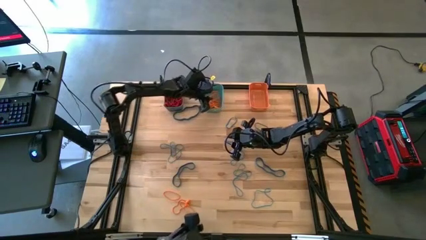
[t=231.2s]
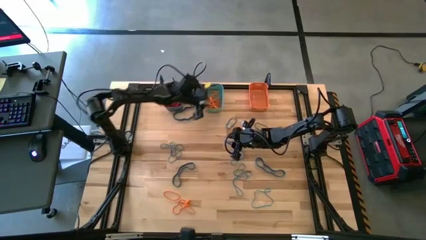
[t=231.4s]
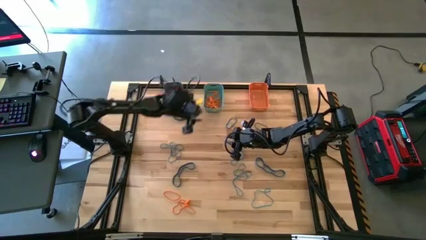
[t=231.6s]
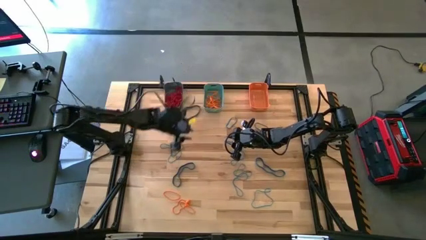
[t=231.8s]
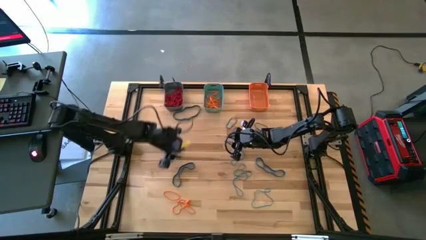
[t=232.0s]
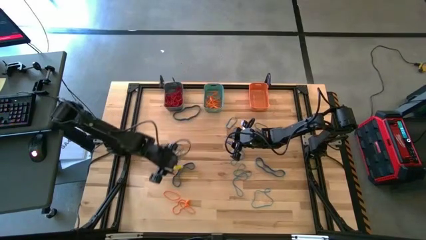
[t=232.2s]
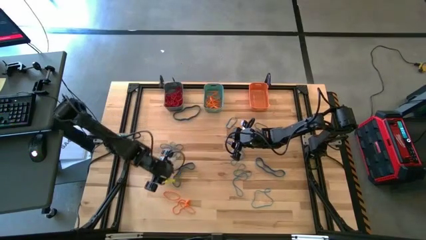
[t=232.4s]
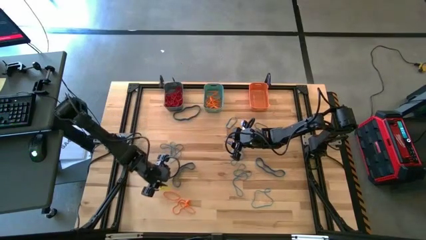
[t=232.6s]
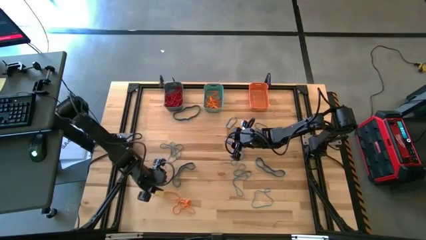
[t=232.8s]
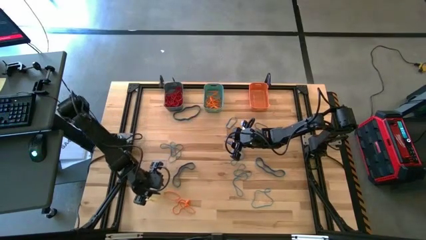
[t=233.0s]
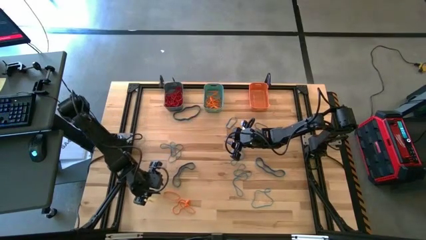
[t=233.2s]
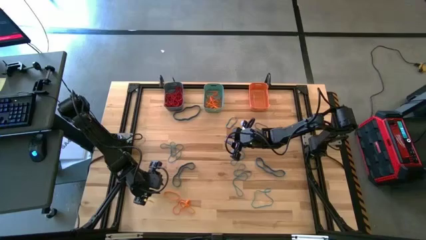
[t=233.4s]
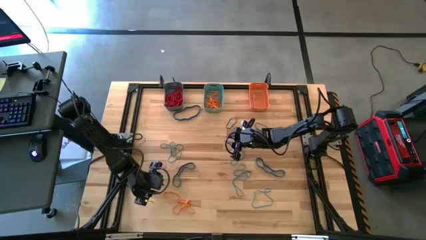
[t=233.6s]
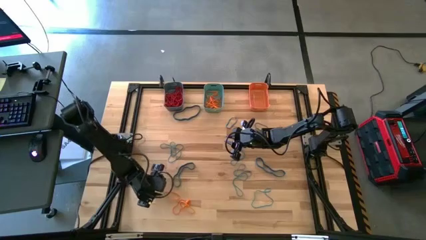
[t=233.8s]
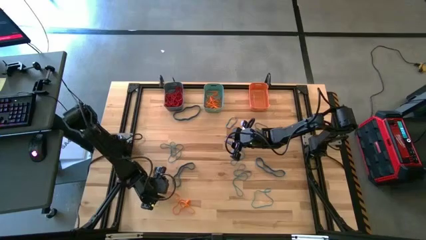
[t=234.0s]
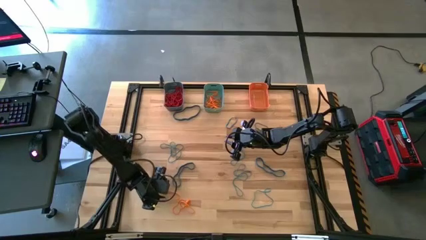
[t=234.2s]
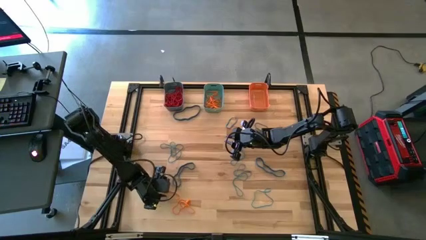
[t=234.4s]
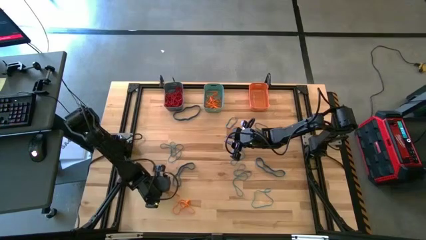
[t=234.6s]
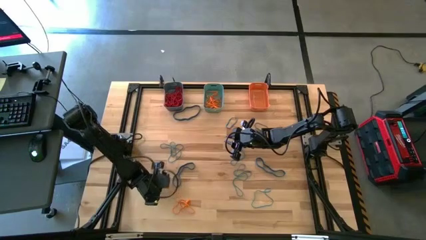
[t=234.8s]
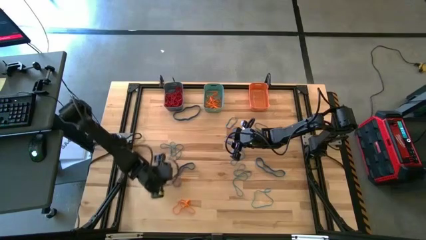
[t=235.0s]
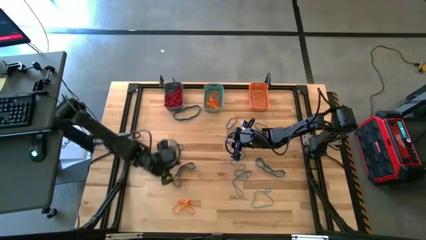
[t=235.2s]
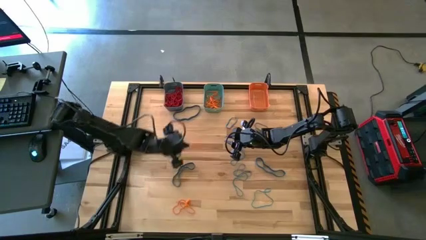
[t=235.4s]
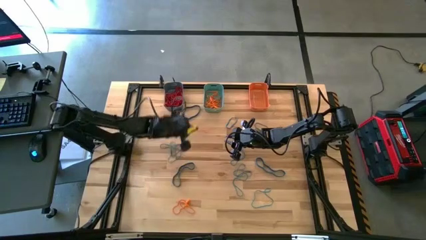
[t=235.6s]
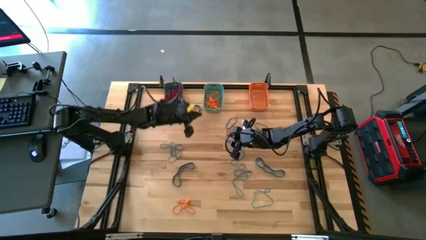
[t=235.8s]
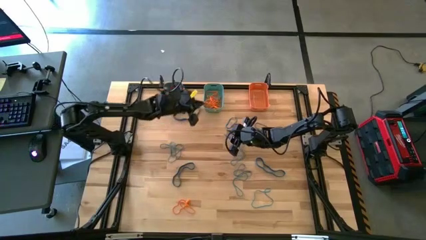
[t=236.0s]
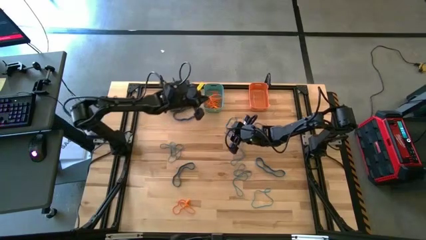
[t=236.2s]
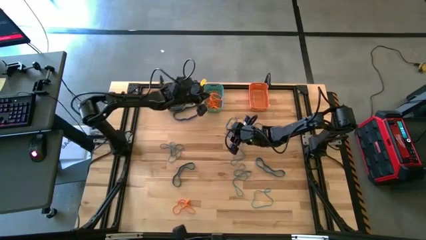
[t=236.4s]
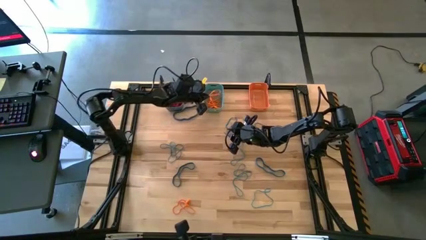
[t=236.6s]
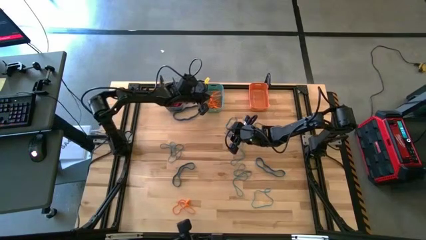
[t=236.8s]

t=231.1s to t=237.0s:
Task: Sort rubber bands into baskets
Put the orange rubber band into the green bin

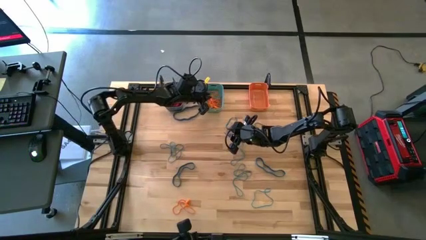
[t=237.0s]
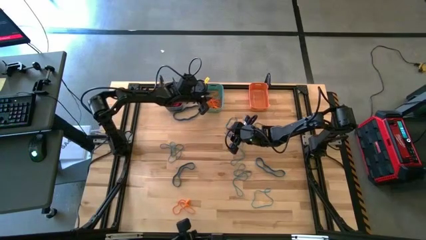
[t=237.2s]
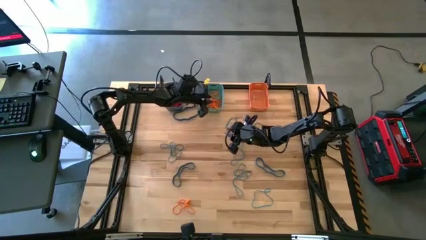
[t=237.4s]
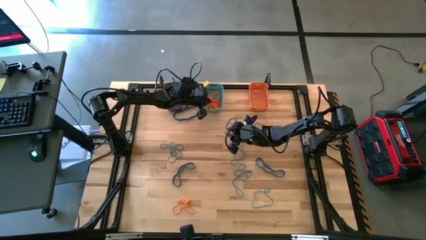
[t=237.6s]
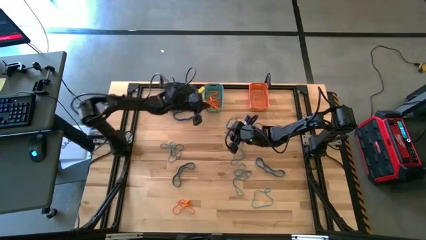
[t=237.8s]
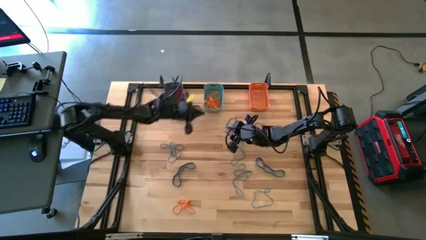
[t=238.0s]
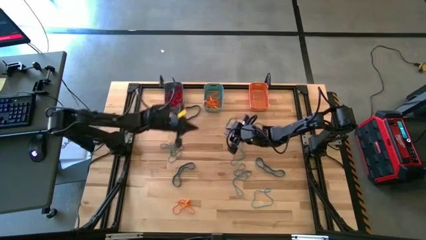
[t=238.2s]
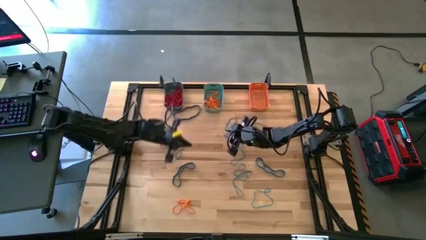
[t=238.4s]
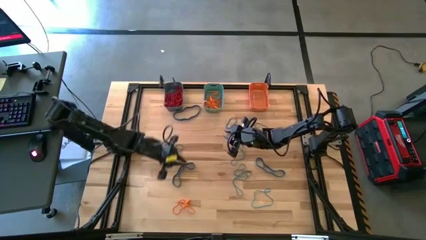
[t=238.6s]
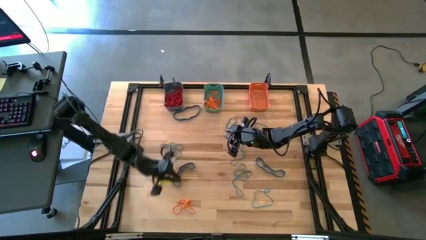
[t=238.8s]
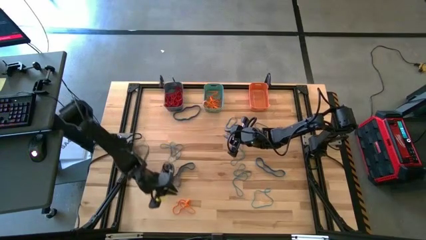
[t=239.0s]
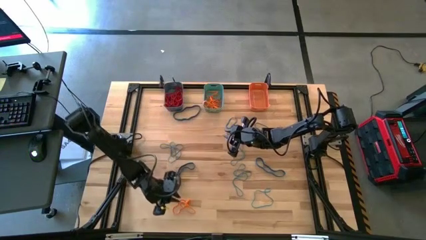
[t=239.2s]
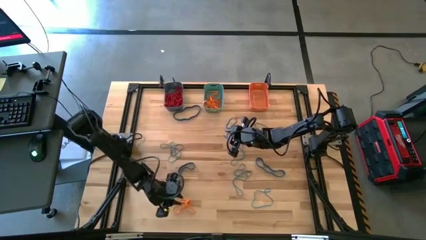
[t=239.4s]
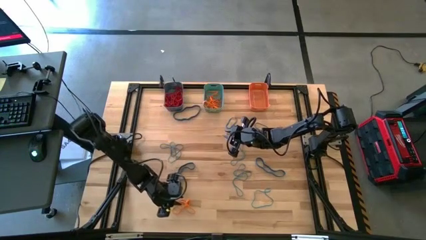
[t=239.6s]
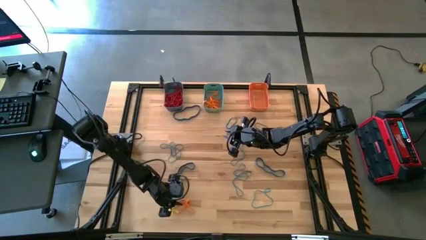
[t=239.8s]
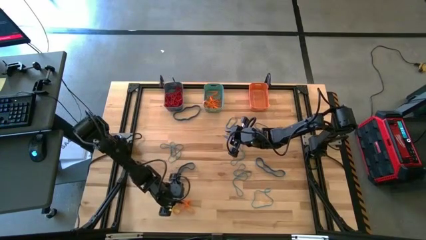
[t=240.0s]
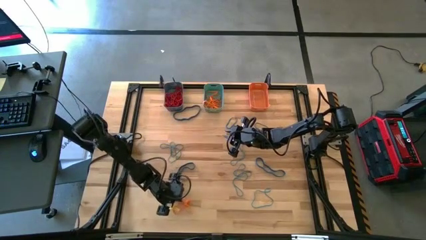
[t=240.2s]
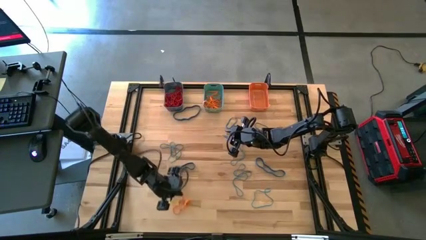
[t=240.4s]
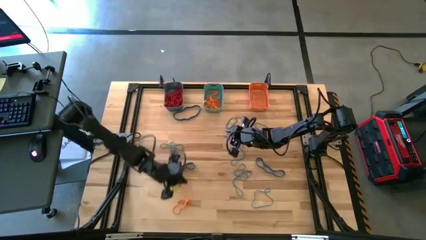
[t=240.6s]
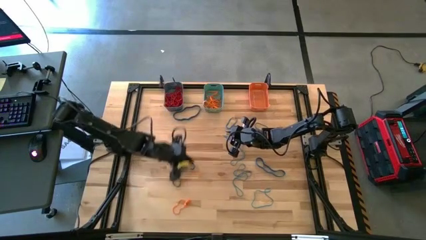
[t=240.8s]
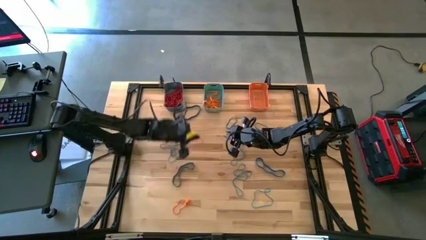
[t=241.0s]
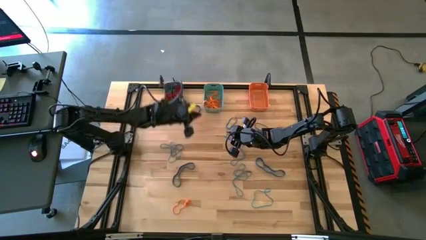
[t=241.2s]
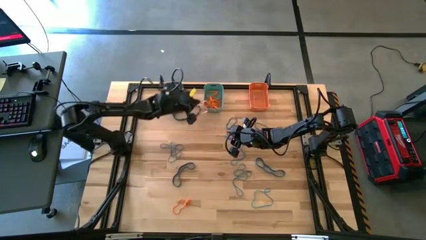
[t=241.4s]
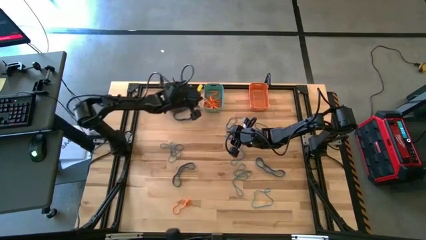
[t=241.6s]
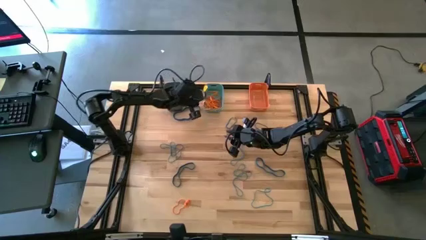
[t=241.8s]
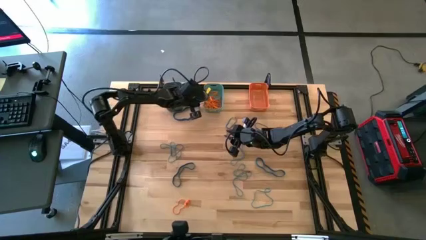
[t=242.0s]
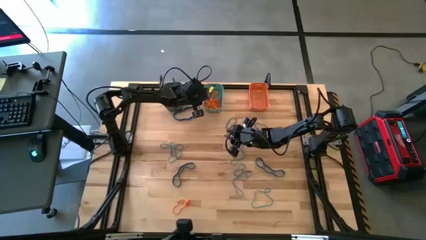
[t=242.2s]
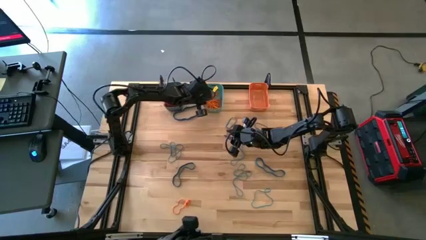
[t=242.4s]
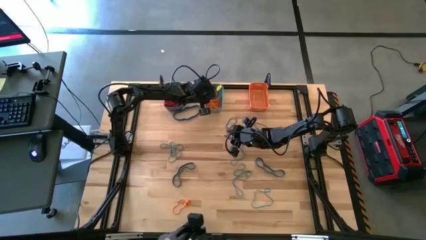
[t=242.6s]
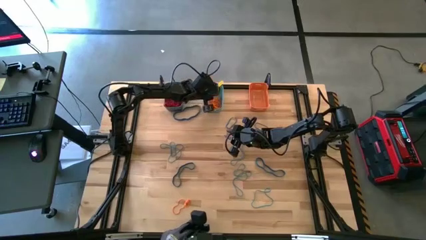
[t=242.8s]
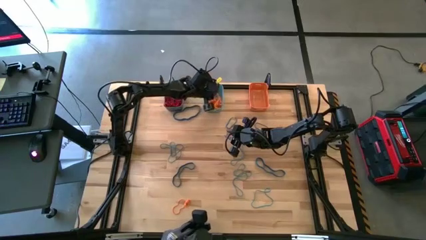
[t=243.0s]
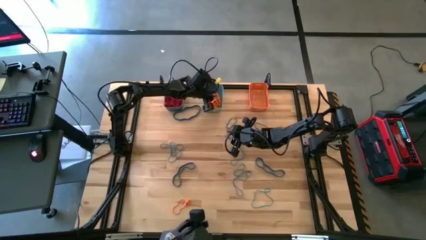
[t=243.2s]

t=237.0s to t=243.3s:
Put the orange rubber band into the green bin

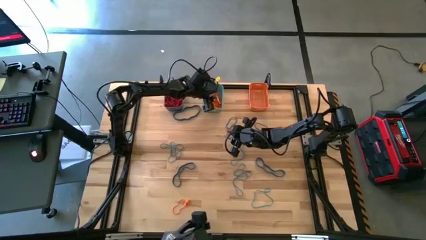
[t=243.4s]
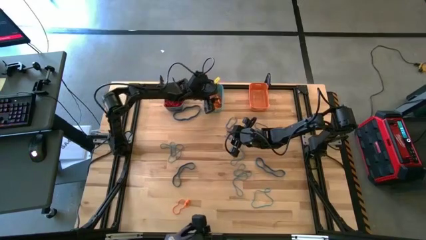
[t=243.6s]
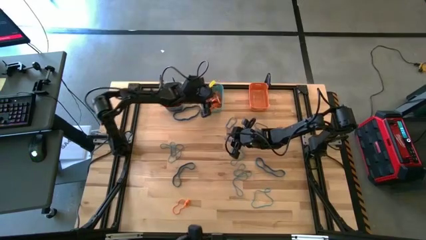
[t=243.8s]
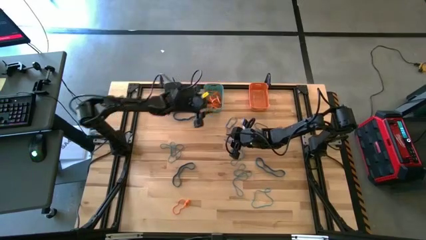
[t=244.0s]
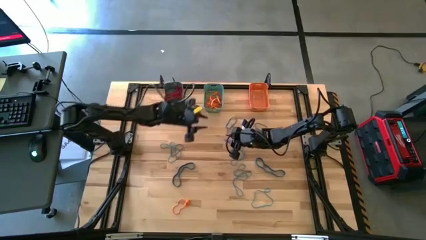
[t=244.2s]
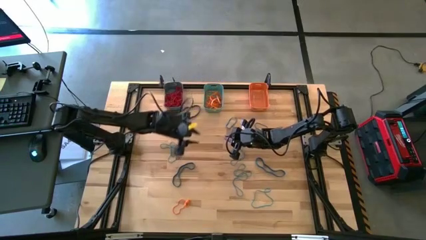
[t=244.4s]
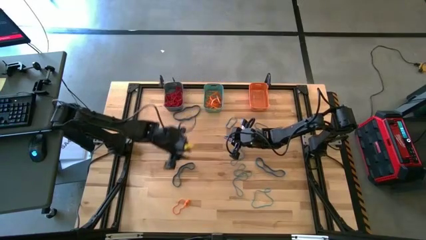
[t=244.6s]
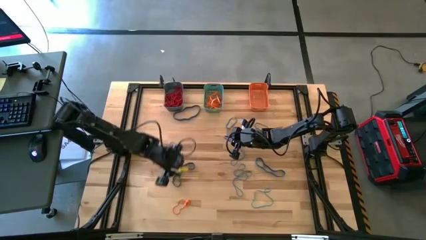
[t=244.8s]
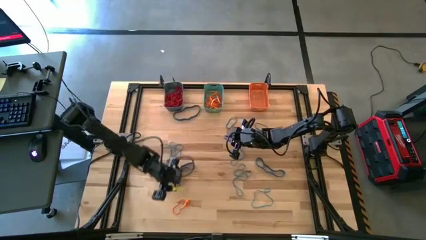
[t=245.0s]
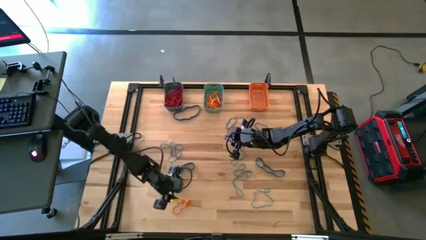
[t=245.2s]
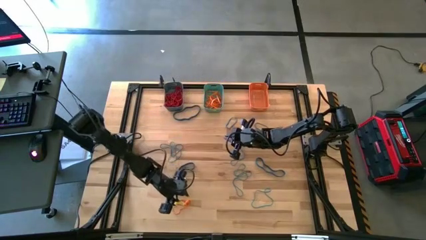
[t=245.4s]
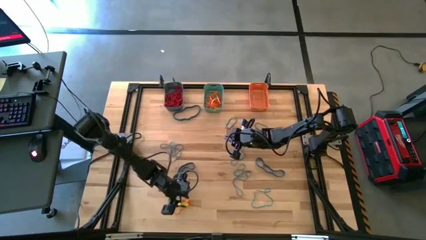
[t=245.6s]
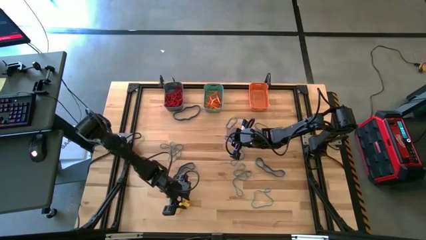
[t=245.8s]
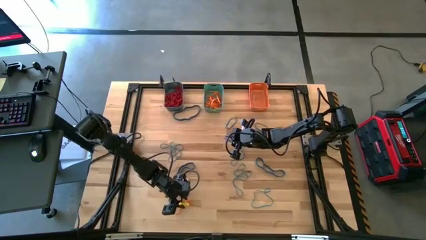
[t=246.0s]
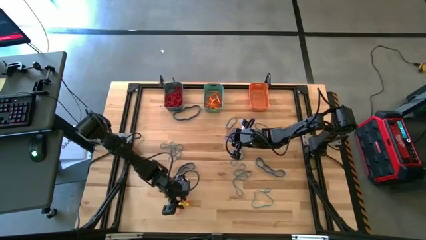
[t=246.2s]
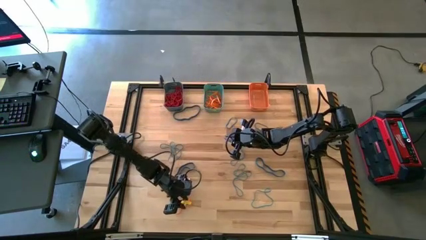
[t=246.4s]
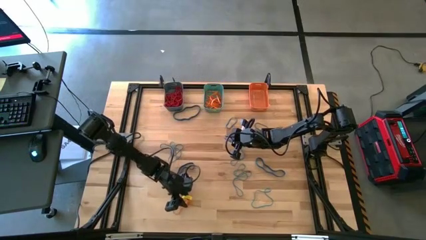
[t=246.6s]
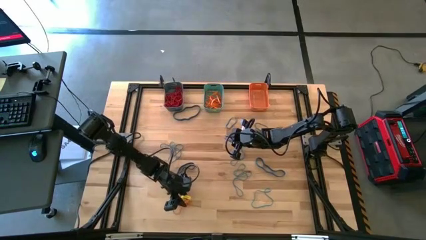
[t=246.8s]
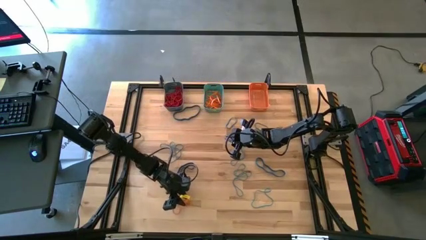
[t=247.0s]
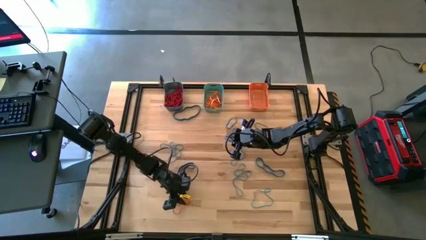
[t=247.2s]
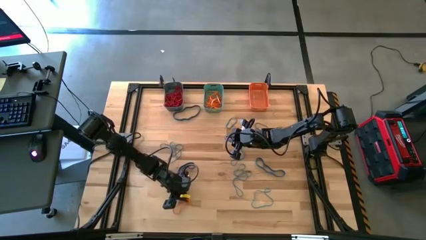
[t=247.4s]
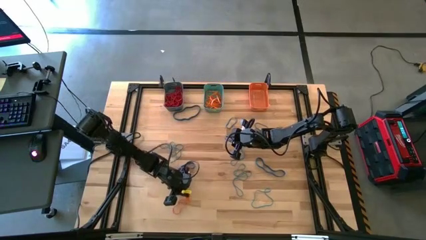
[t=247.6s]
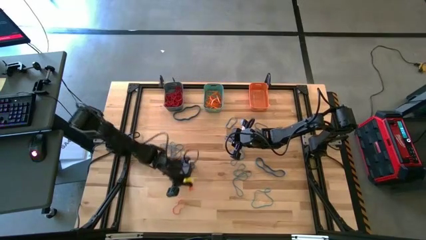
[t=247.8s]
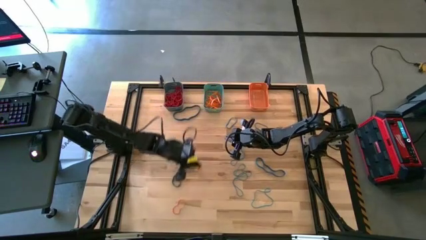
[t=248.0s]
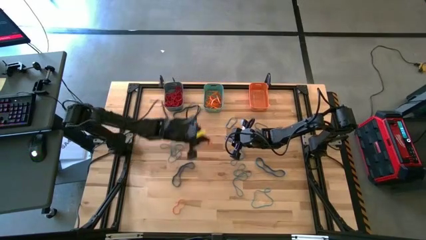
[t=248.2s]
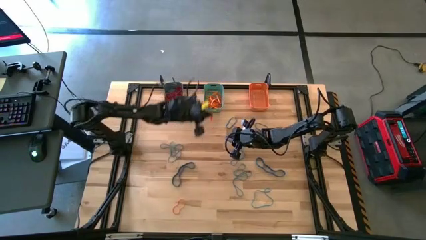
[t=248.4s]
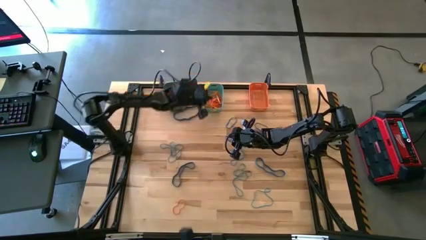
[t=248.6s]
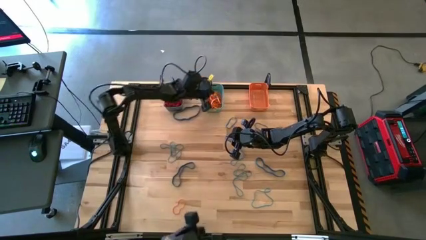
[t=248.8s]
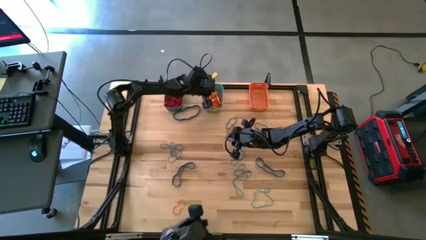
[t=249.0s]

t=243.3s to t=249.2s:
Put the orange rubber band into the green bin
